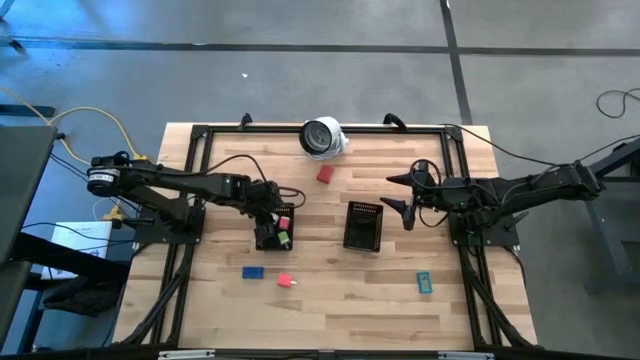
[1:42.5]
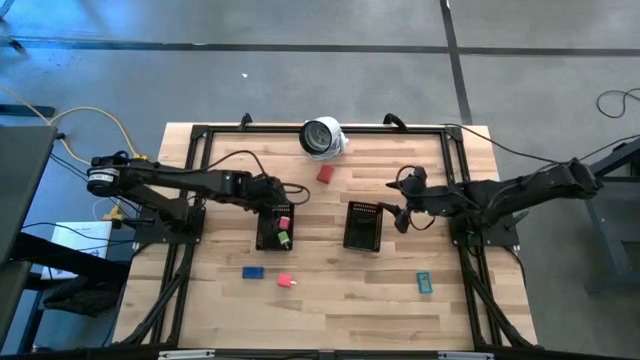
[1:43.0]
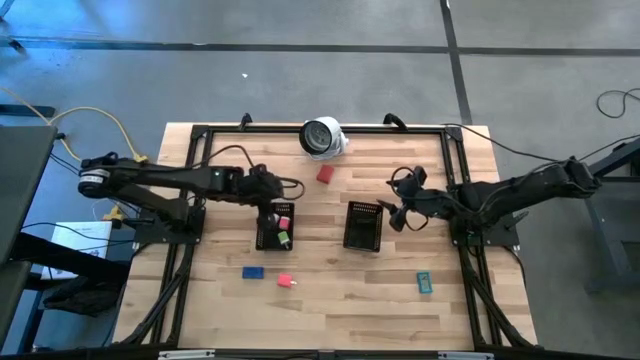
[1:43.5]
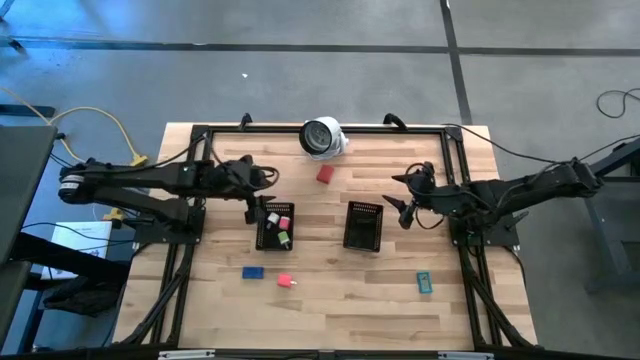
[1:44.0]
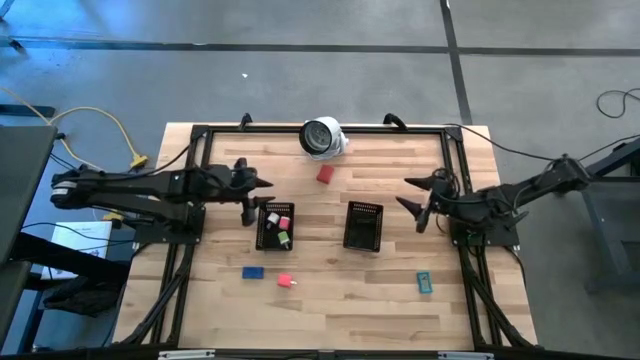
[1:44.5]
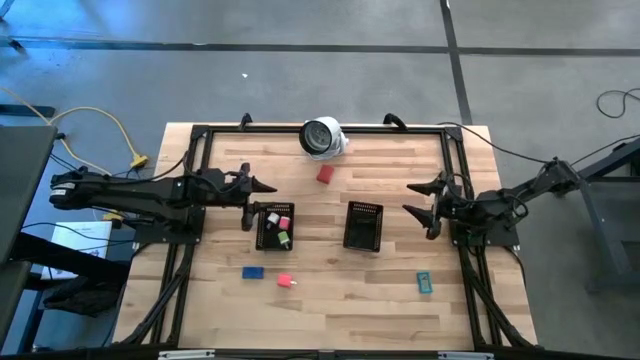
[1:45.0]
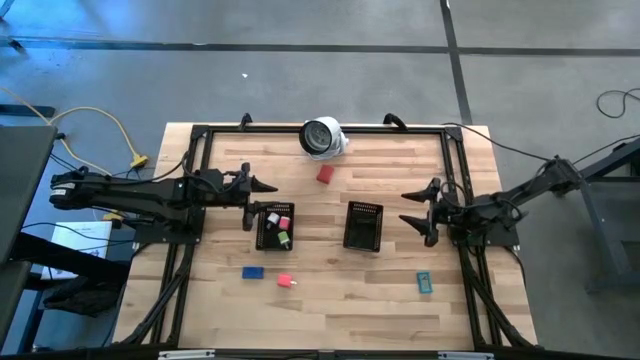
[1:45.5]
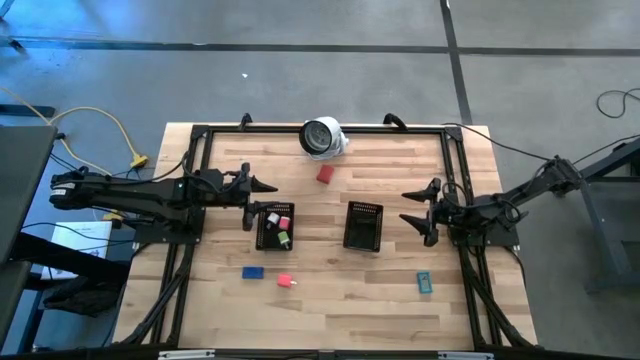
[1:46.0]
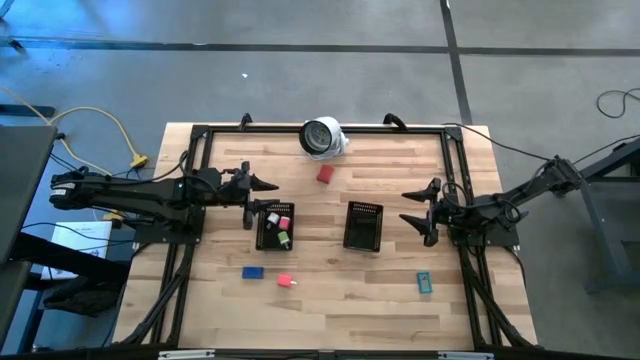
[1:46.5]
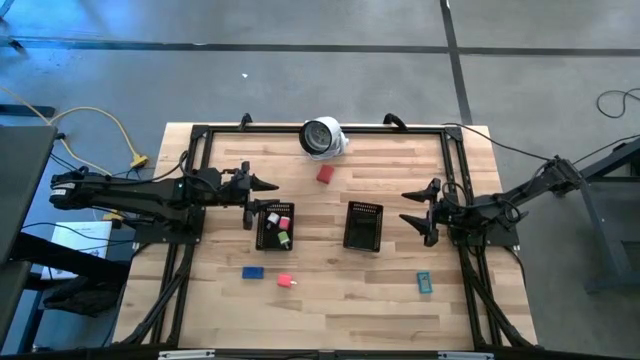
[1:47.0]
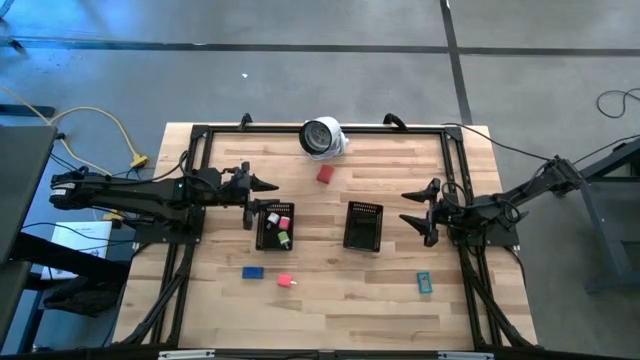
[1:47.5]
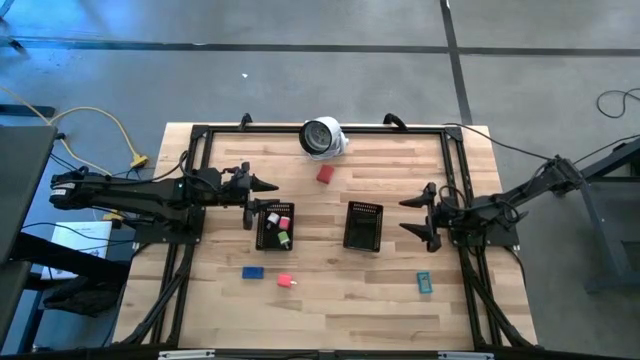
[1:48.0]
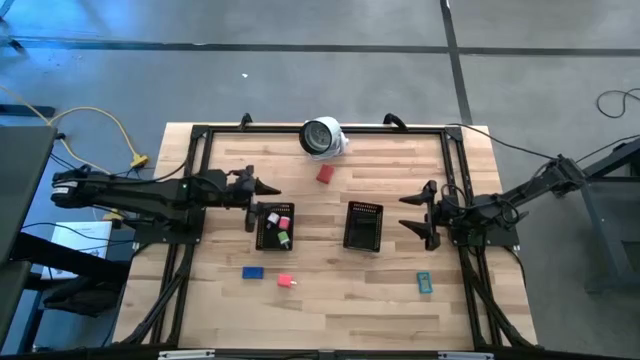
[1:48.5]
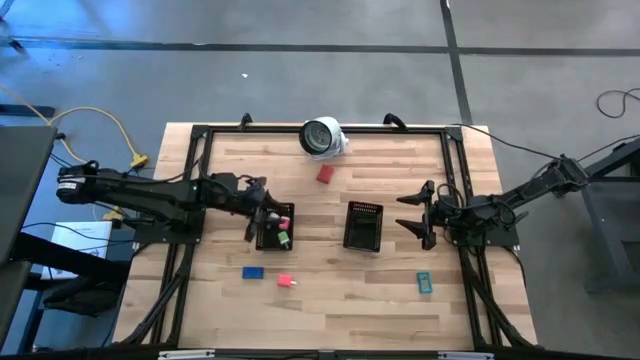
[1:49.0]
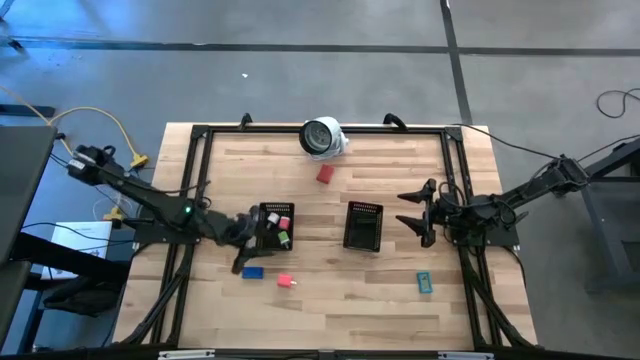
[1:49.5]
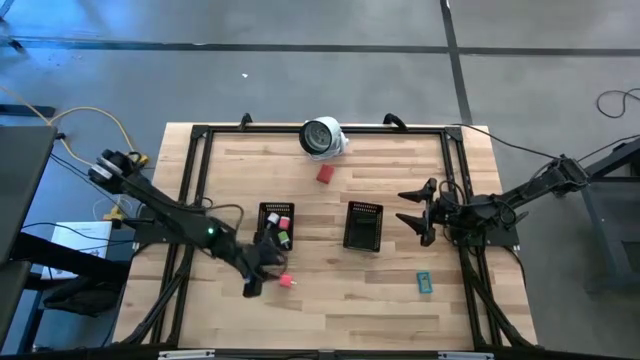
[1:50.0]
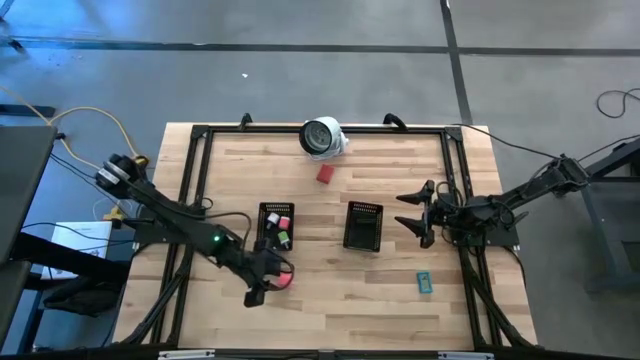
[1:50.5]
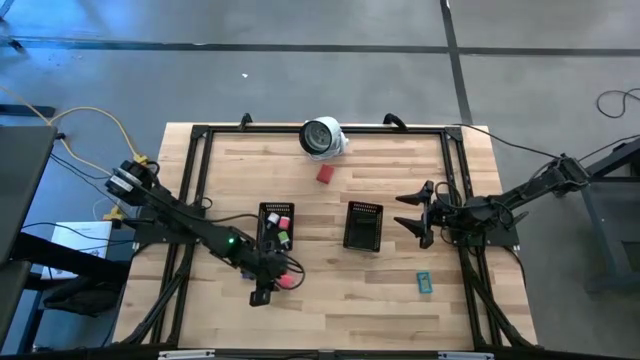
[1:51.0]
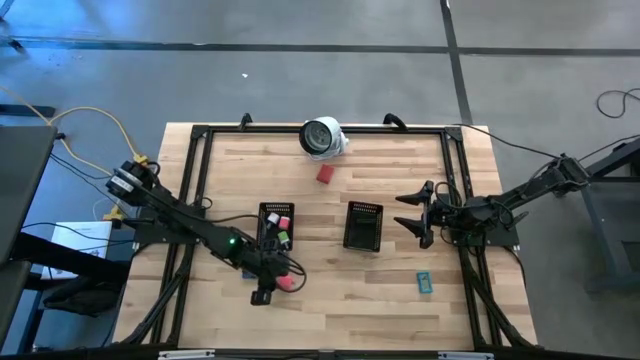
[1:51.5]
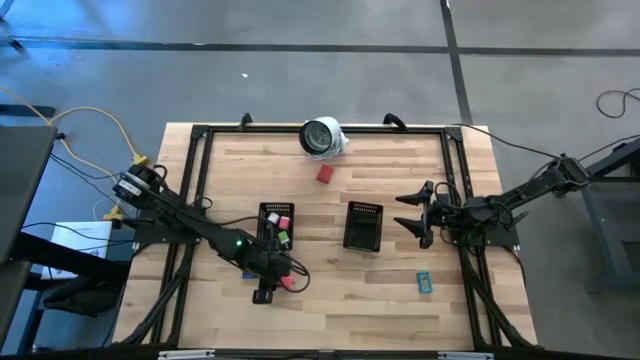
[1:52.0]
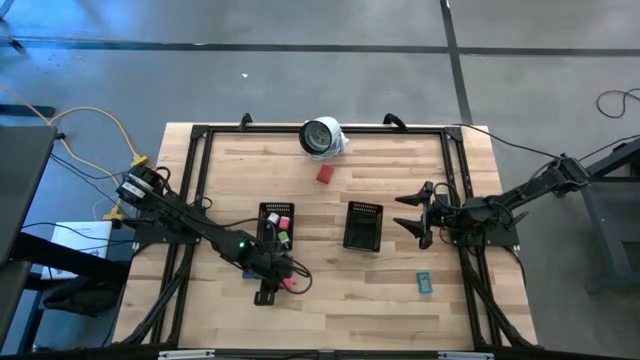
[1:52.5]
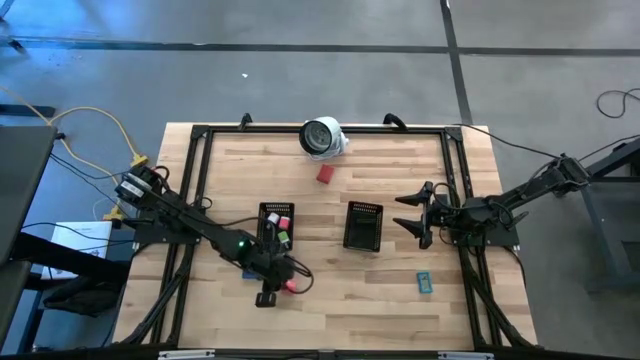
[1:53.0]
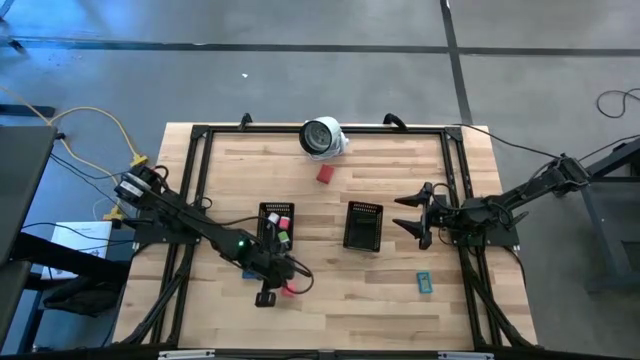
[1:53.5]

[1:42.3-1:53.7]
Task: Pick & Place Office items
Put the pink charger adapter into the left black bin

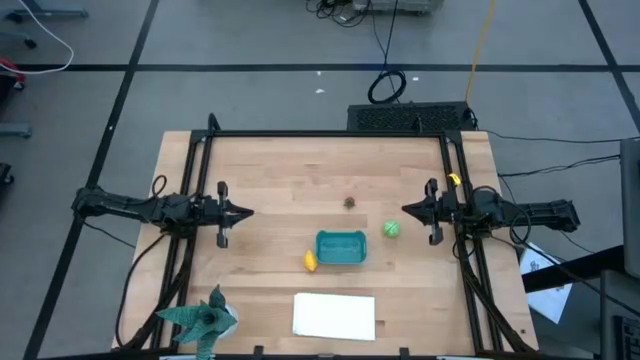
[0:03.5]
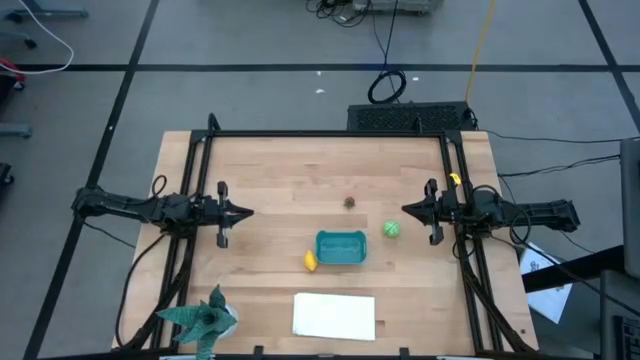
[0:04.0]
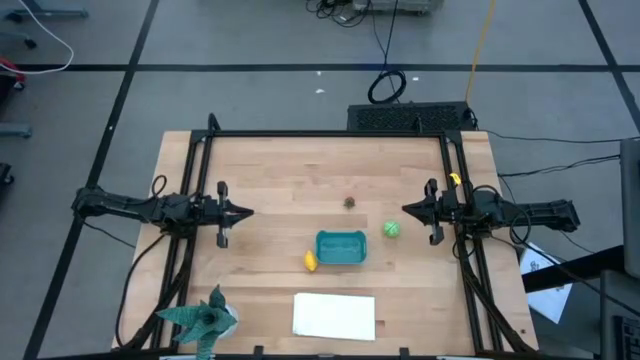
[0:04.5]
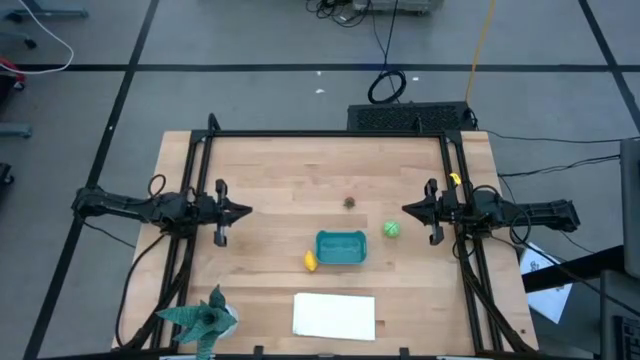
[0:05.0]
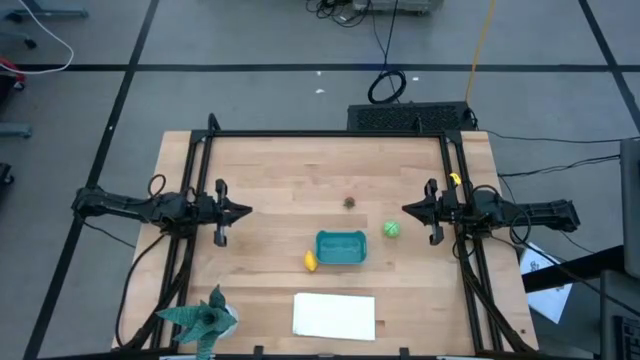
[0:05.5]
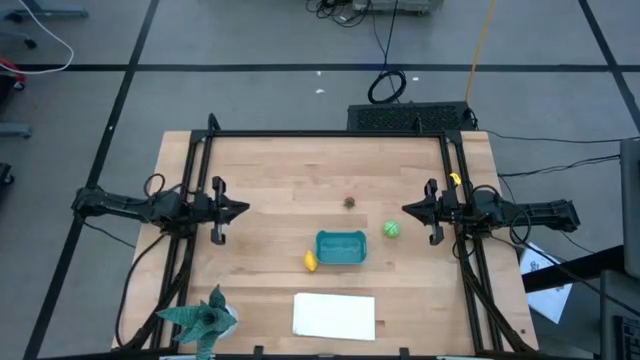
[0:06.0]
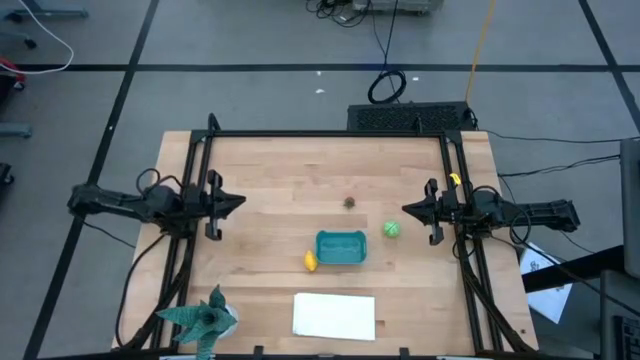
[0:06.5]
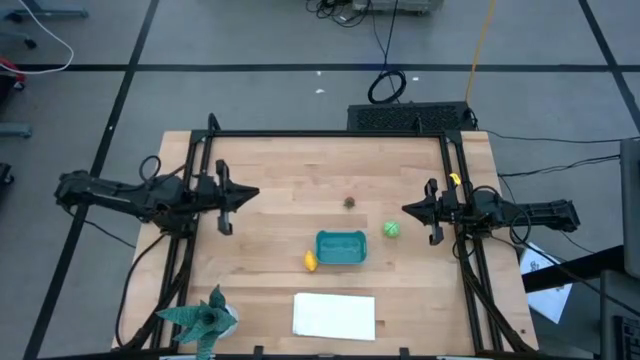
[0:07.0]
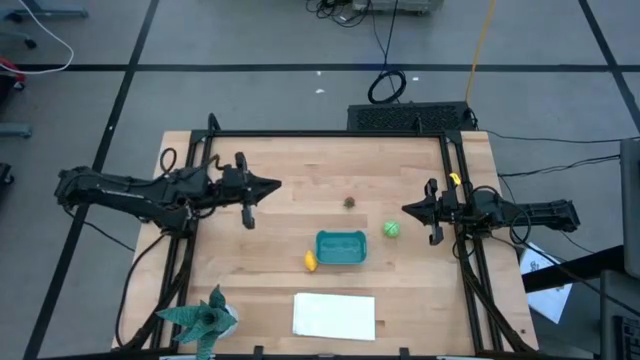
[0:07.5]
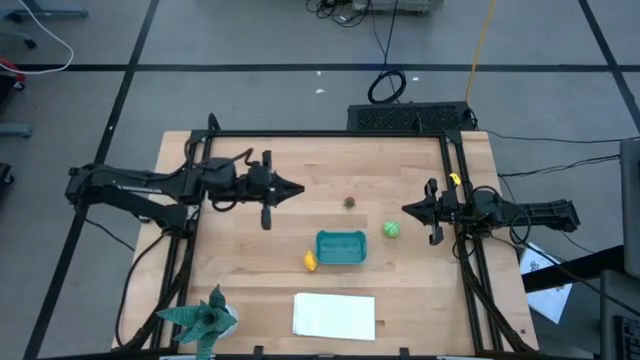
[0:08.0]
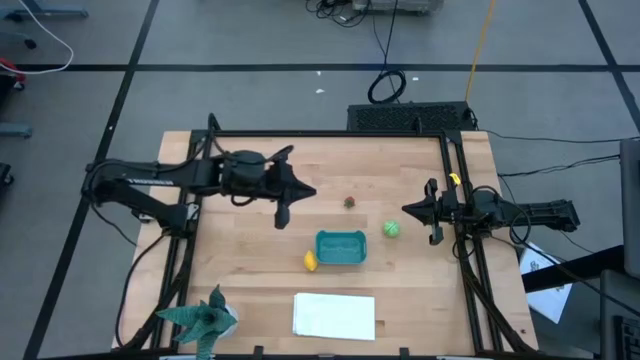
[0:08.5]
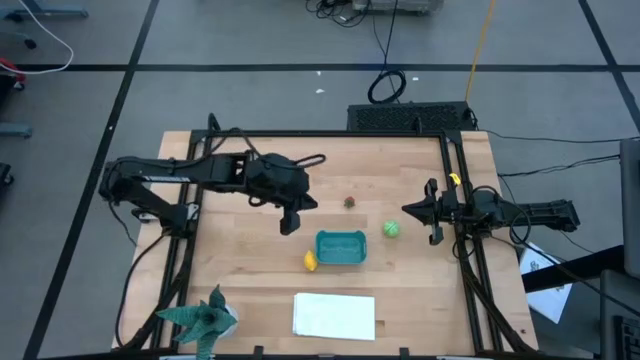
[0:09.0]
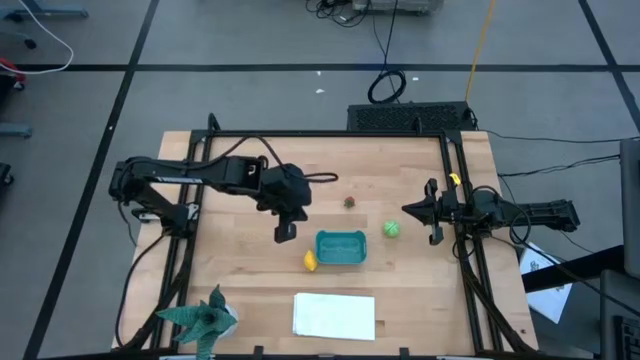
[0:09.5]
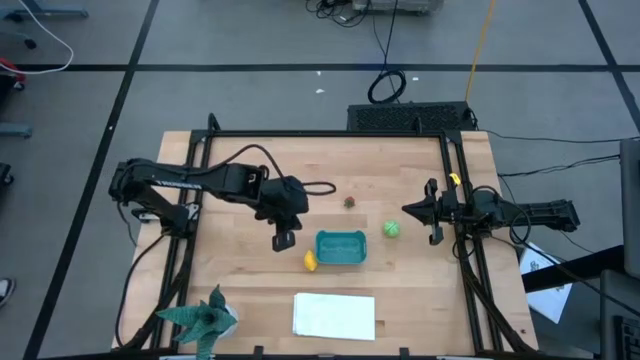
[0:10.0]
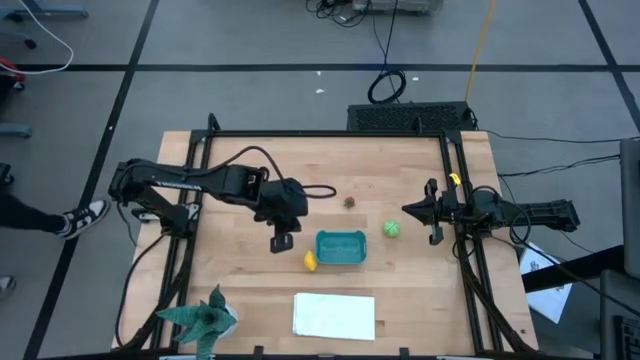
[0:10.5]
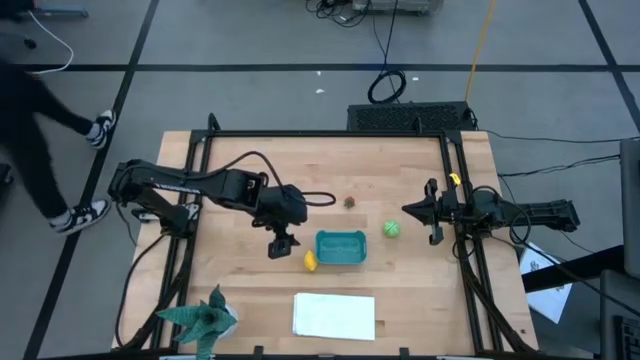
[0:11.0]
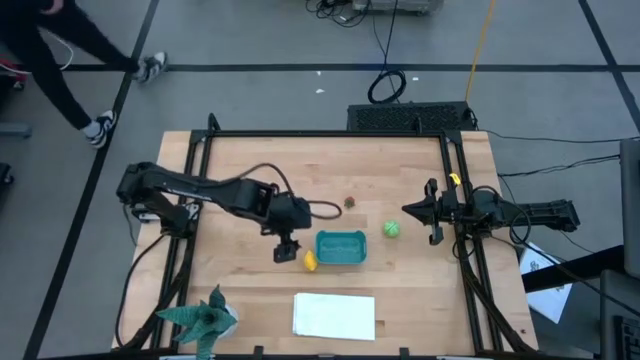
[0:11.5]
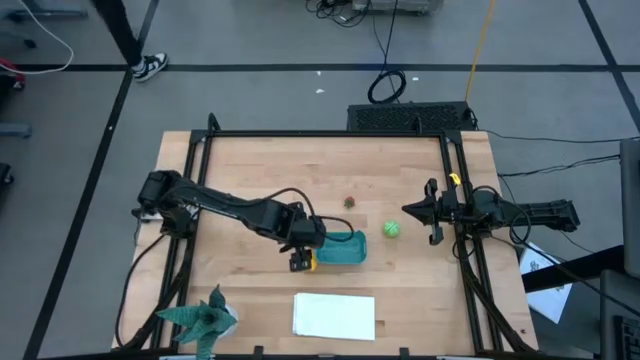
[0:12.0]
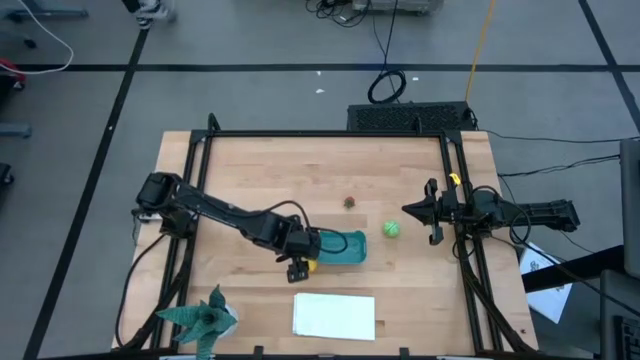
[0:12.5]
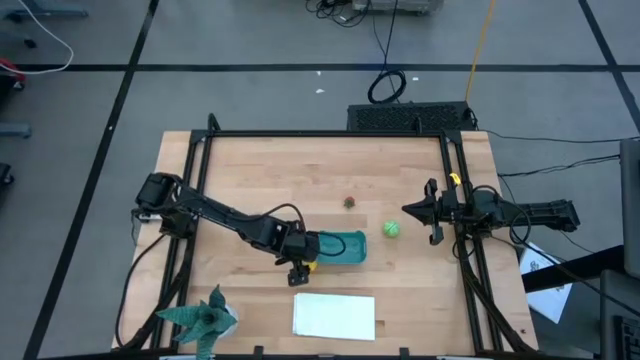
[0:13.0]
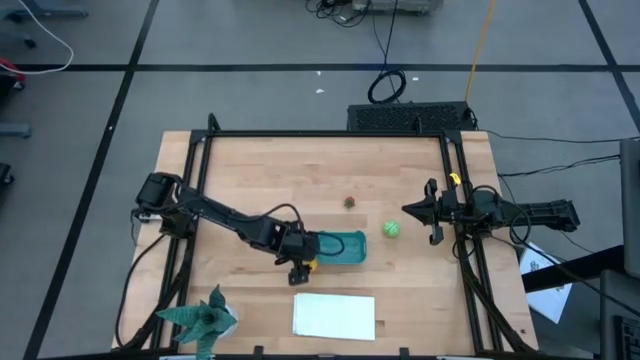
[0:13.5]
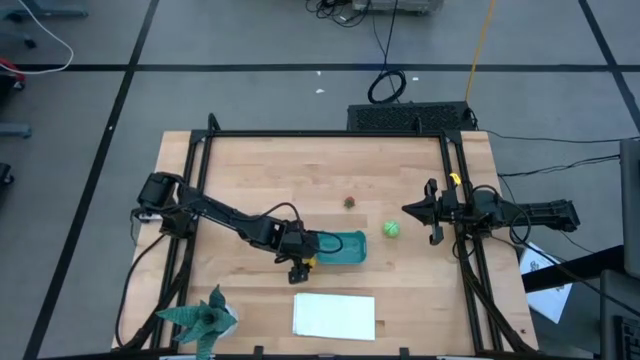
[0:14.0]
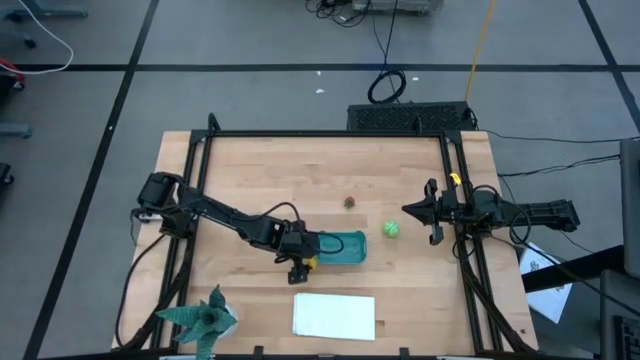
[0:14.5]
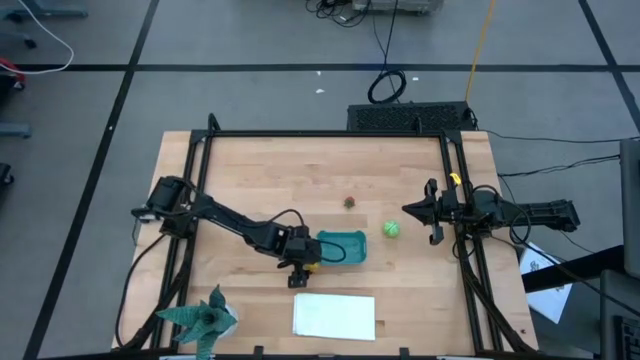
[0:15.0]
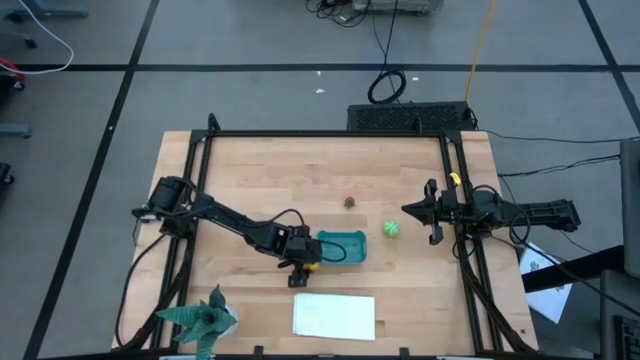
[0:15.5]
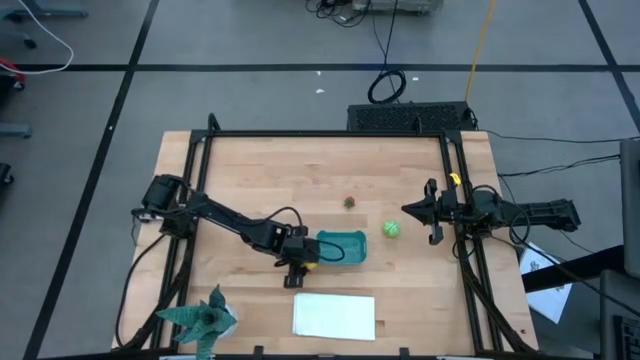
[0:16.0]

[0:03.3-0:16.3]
Task: Pick and placing Produce into tupperware
Put the yellow lemon into the green bin
